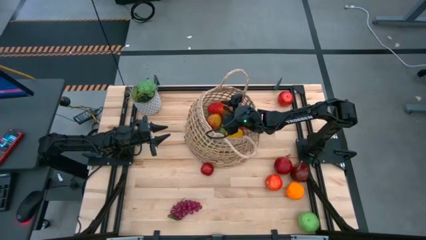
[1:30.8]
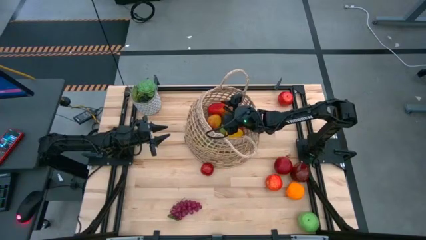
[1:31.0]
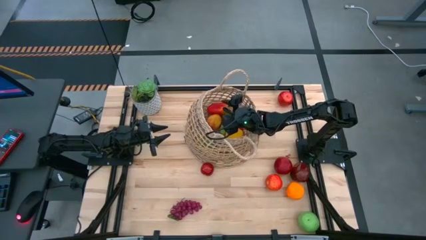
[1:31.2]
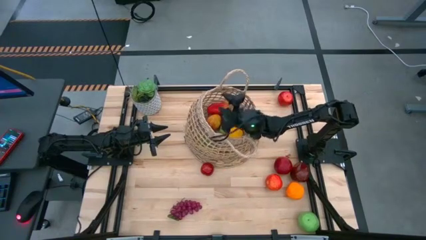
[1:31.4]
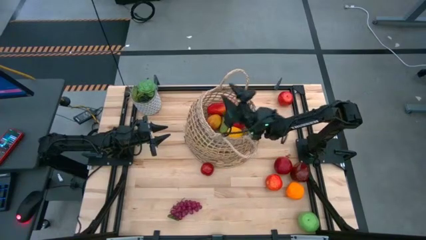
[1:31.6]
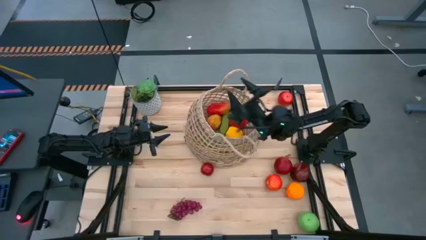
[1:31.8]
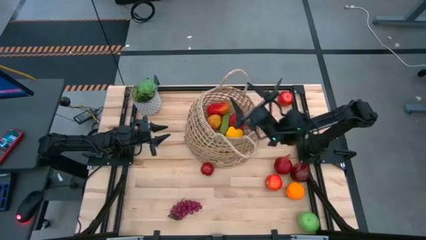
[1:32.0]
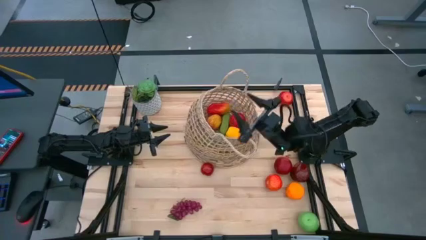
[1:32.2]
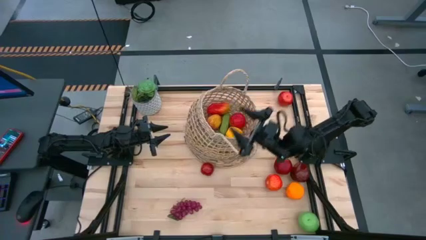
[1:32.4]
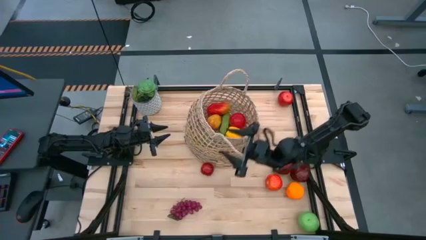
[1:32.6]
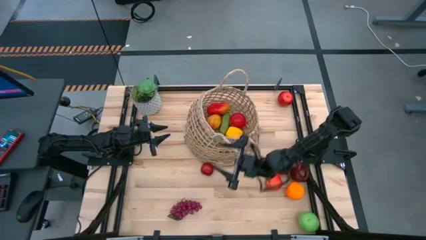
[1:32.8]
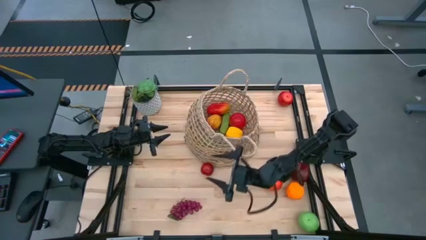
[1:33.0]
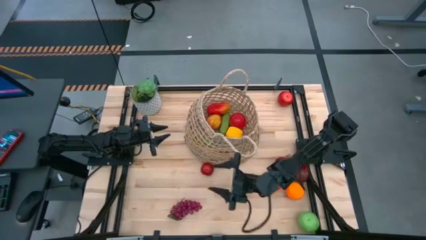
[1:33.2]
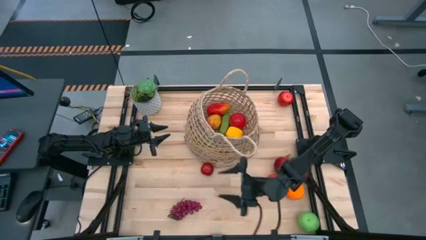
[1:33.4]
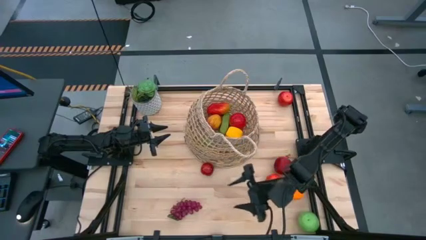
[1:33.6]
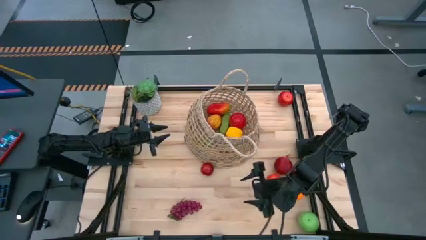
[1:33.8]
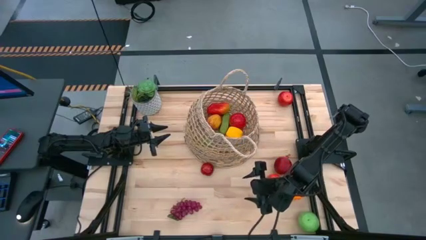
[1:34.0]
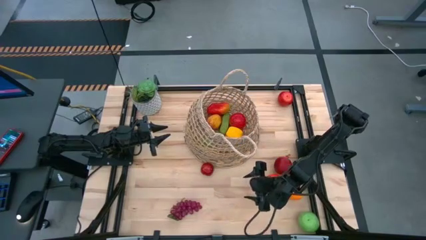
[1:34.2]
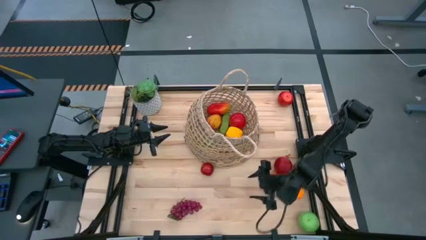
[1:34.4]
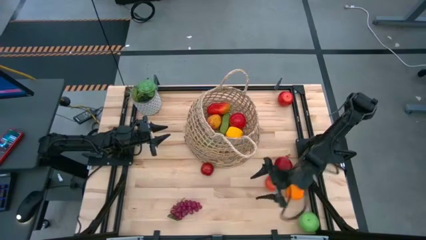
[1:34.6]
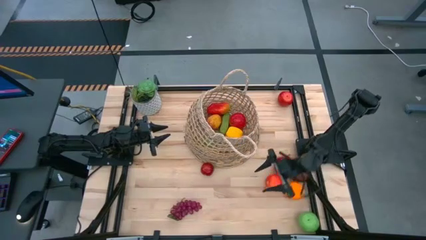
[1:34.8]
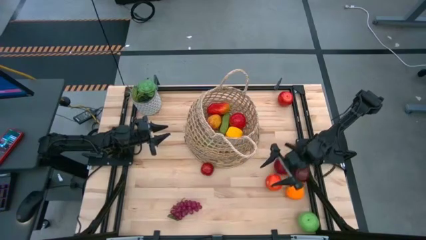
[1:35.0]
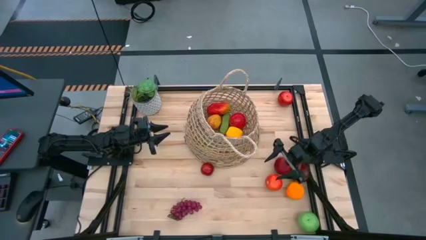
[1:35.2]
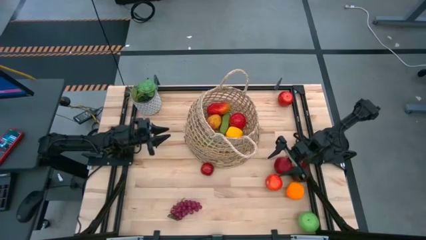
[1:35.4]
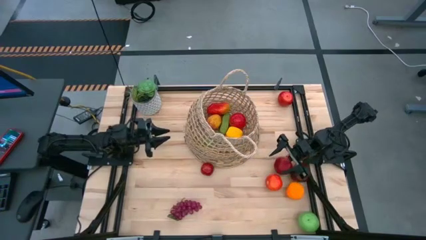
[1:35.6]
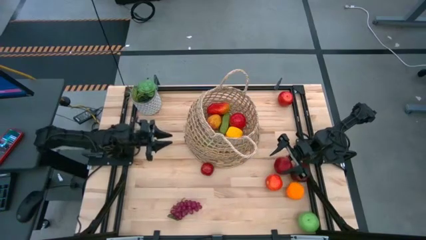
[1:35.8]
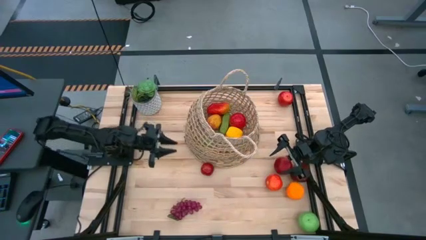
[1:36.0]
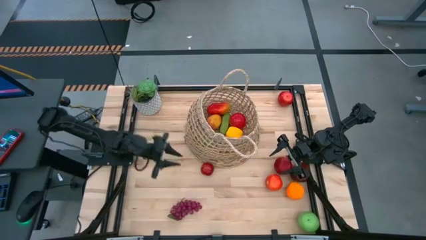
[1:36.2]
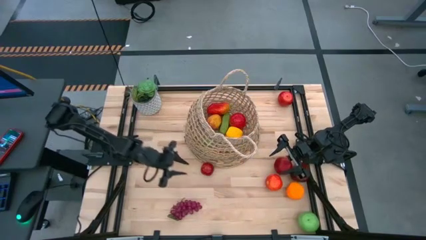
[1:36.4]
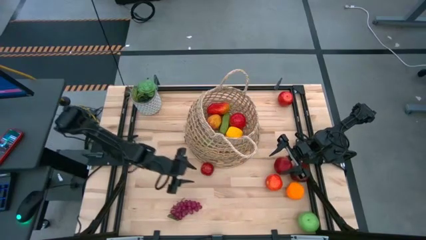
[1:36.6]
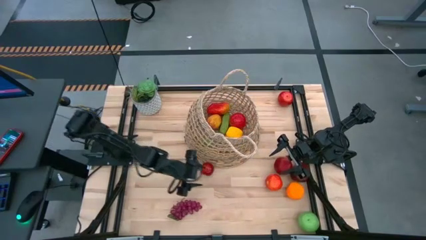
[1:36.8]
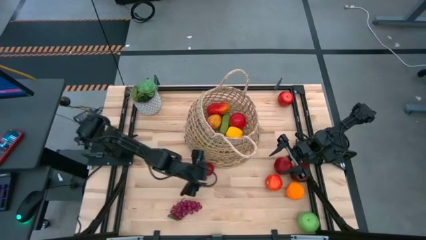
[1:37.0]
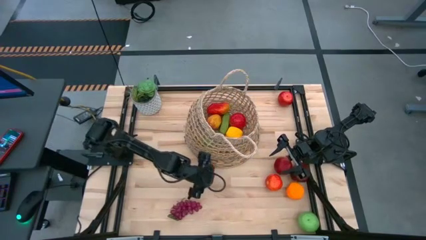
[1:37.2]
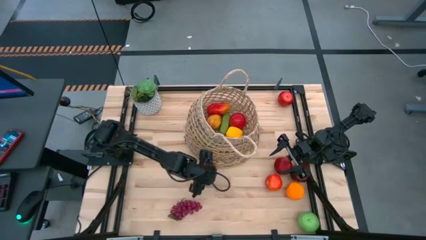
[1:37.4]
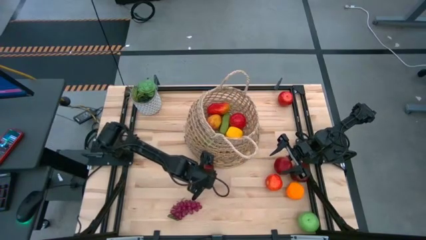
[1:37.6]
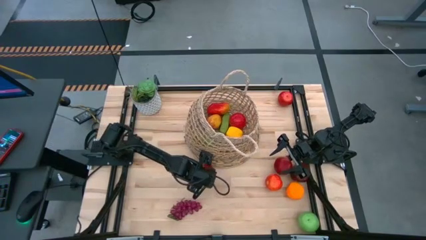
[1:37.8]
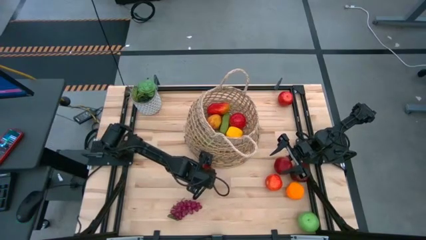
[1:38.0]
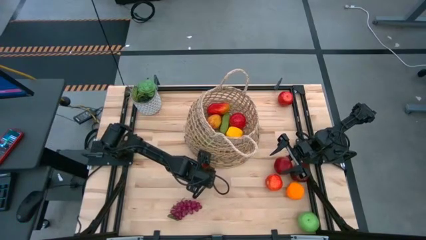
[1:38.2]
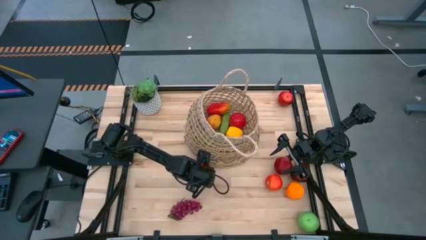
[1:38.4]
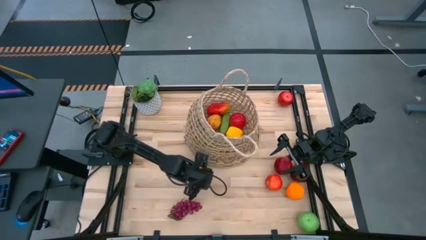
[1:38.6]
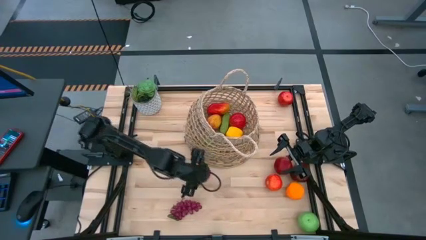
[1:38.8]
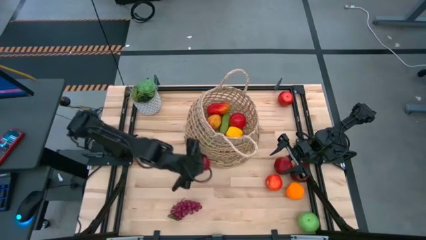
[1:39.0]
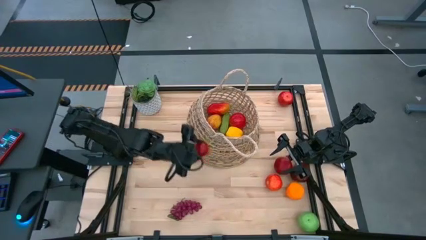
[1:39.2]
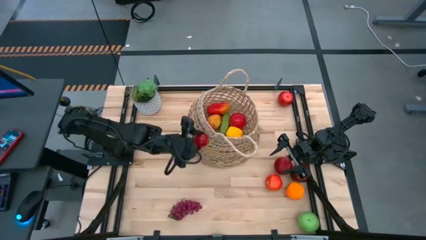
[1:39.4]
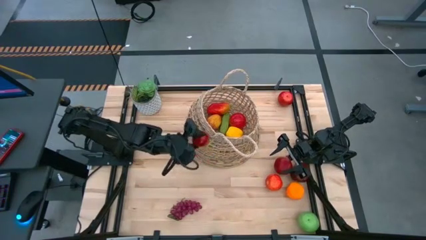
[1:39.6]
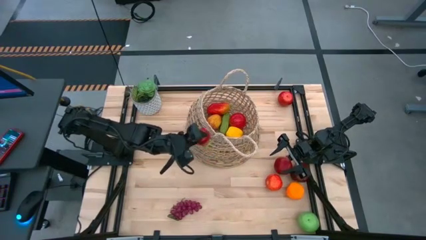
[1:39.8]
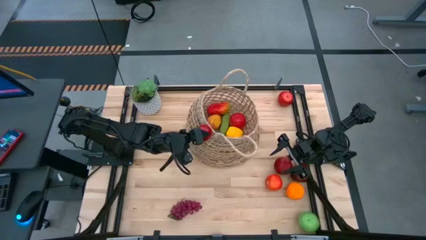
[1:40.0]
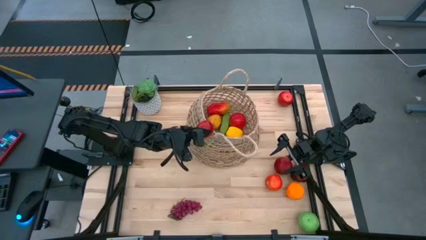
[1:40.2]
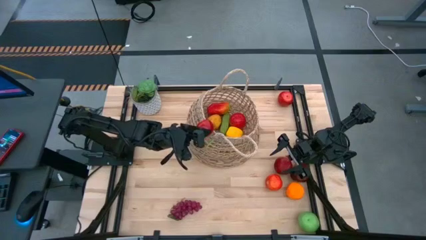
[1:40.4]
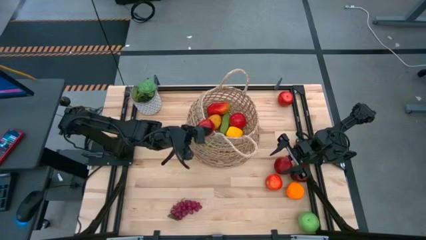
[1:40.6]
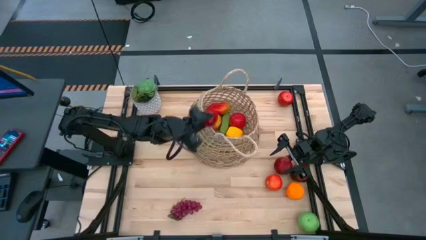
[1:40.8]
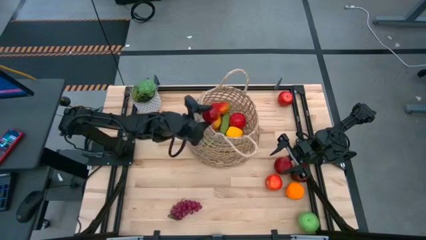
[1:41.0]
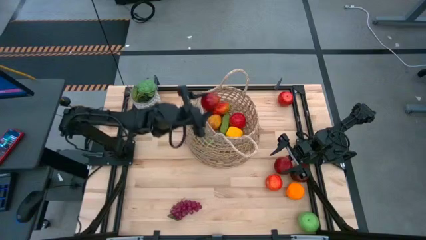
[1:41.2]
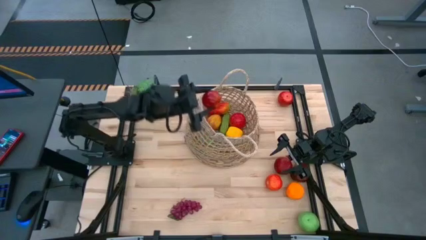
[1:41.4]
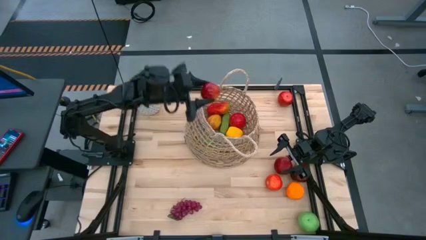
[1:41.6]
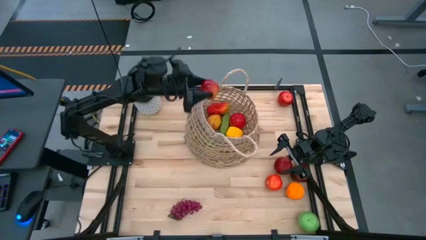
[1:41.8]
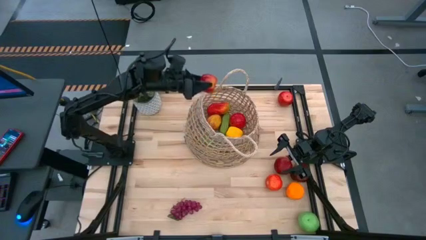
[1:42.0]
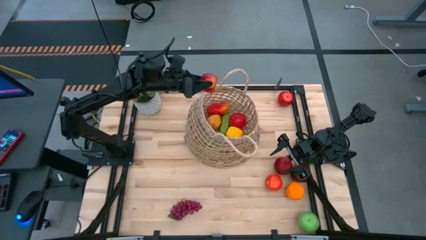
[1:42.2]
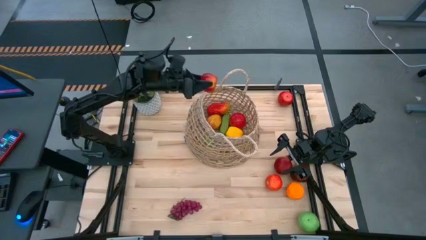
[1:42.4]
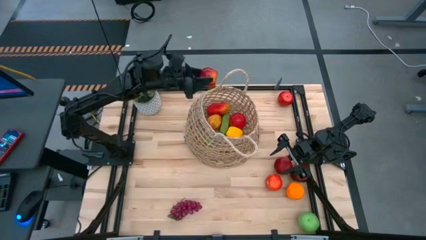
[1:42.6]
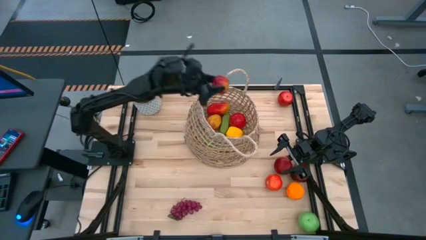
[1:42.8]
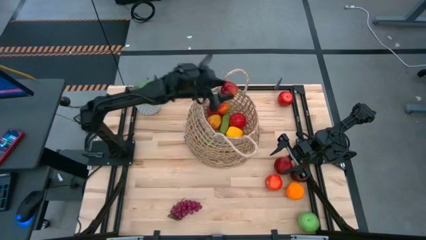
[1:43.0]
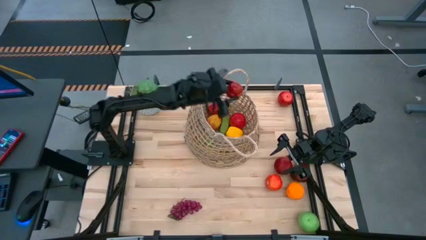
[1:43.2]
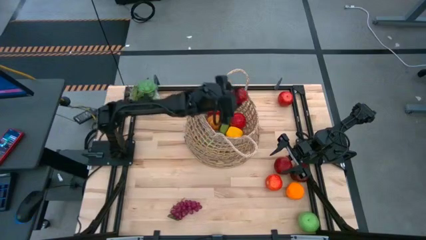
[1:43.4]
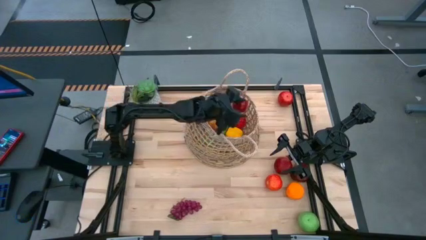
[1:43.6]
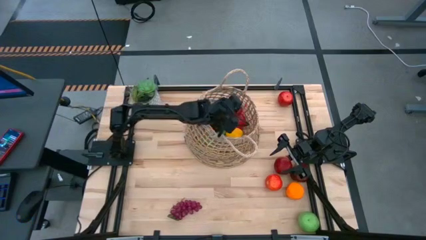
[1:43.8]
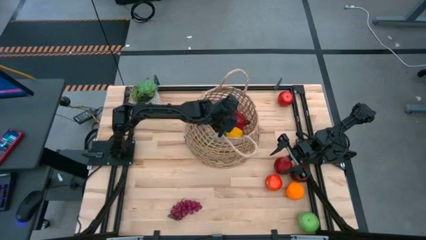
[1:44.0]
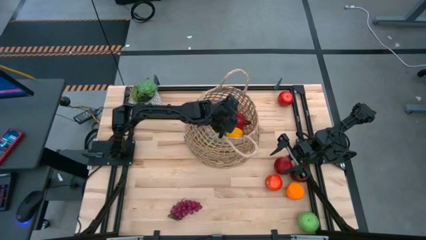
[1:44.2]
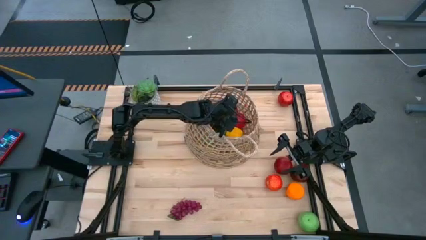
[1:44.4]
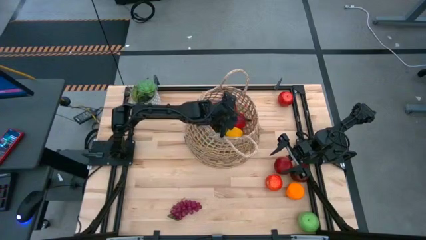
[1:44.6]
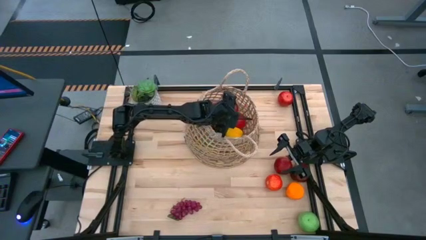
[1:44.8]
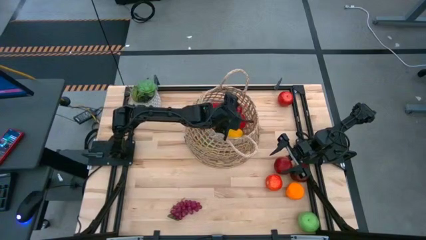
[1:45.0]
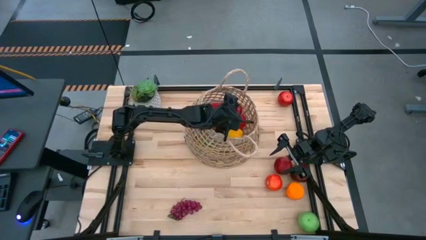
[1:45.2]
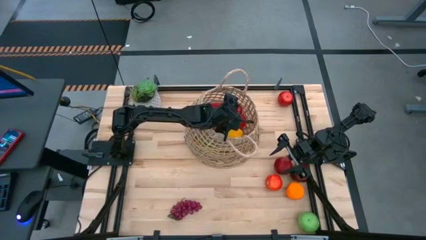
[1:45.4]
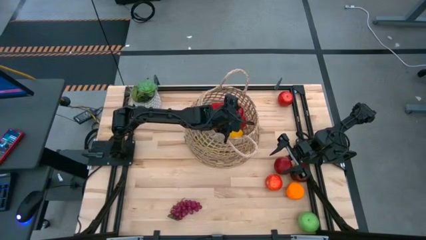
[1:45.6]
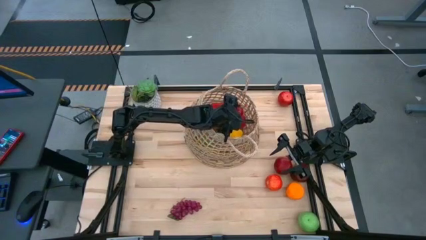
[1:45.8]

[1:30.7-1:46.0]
Task: Build produce basket
Put the red apple into the brown basket
